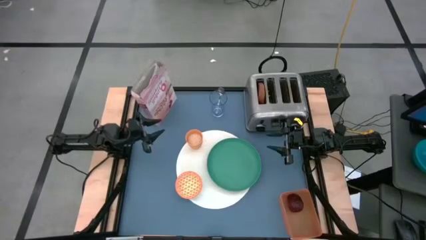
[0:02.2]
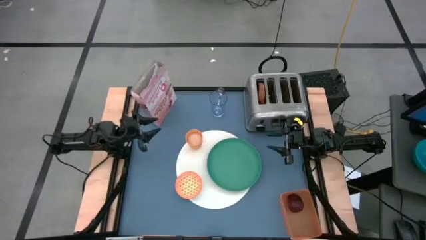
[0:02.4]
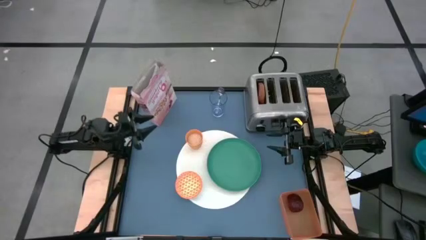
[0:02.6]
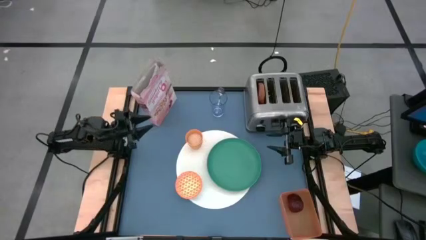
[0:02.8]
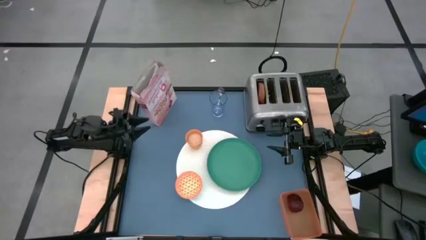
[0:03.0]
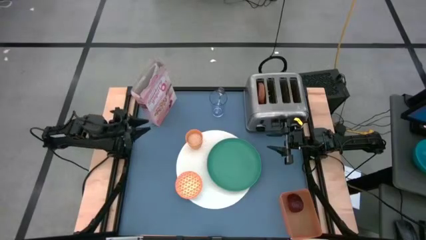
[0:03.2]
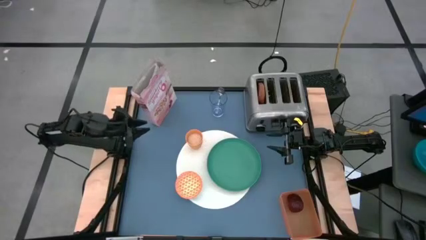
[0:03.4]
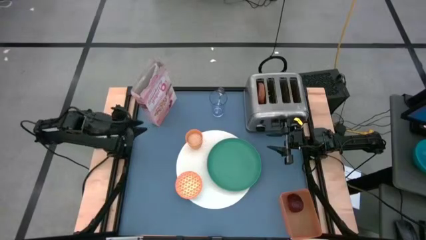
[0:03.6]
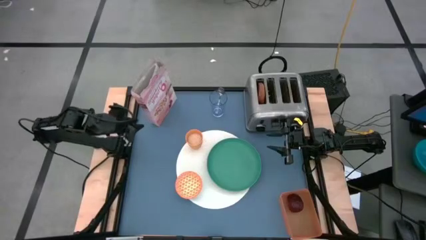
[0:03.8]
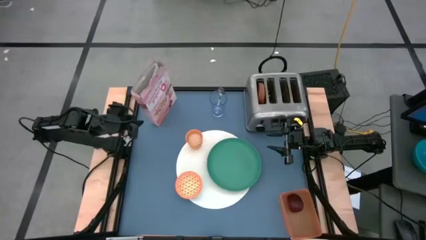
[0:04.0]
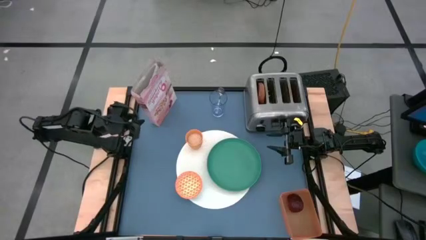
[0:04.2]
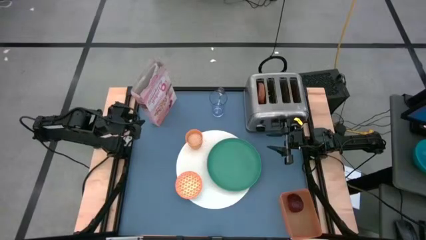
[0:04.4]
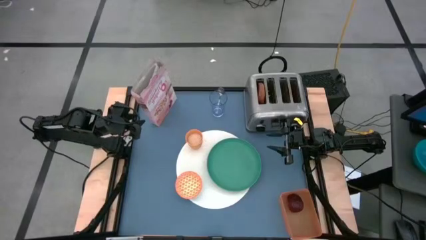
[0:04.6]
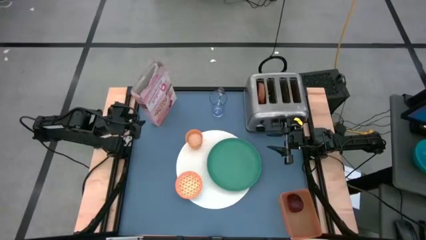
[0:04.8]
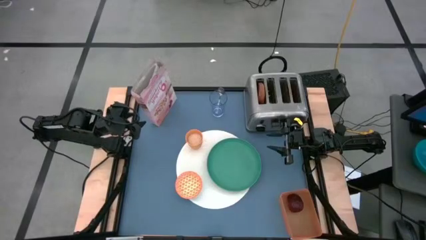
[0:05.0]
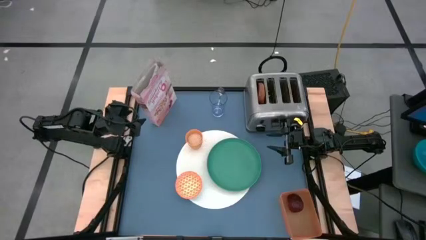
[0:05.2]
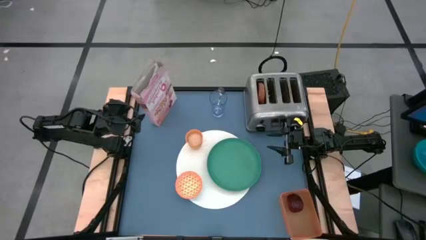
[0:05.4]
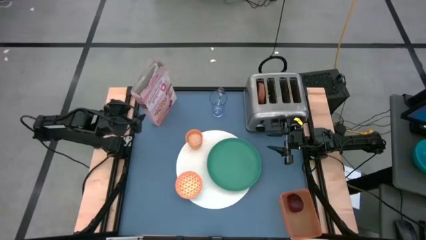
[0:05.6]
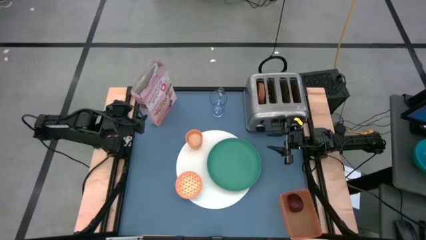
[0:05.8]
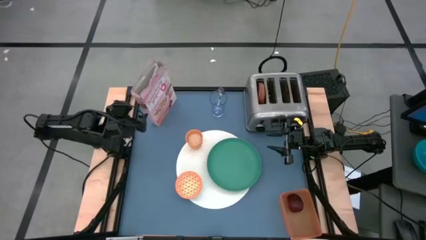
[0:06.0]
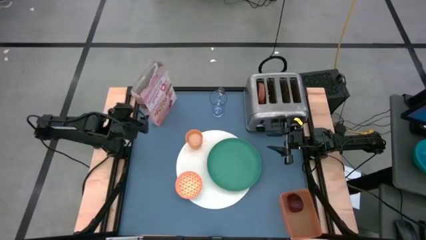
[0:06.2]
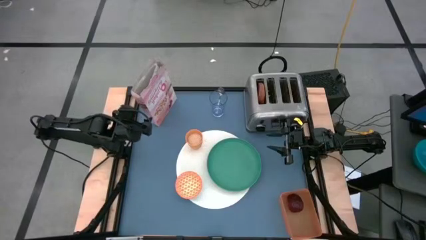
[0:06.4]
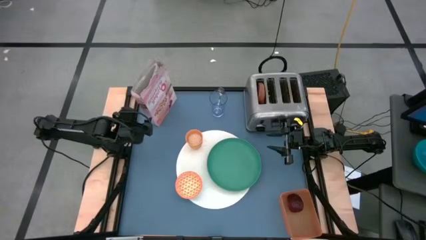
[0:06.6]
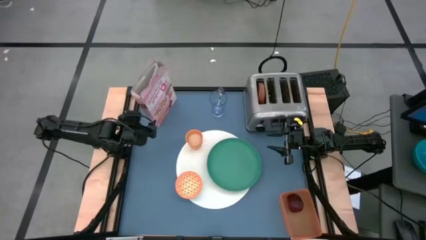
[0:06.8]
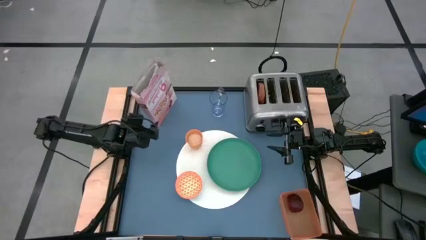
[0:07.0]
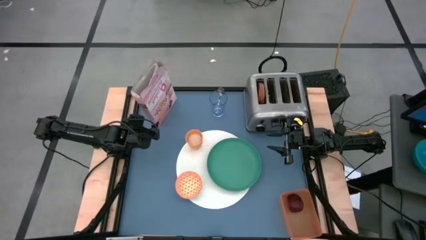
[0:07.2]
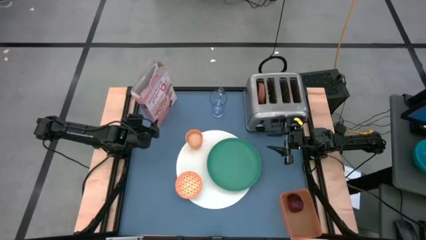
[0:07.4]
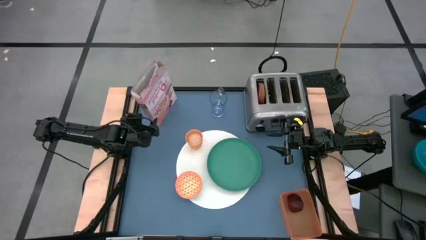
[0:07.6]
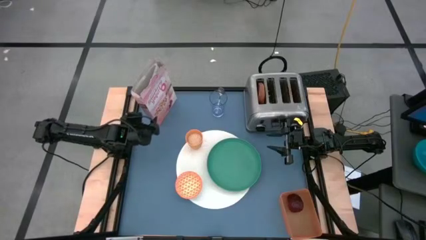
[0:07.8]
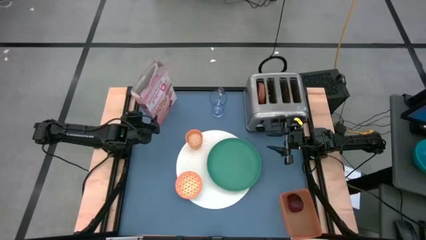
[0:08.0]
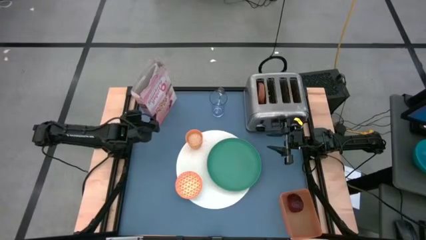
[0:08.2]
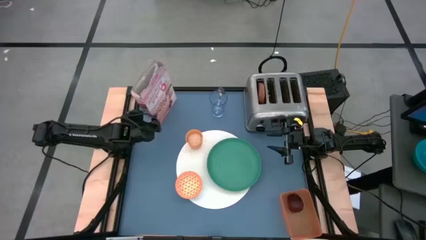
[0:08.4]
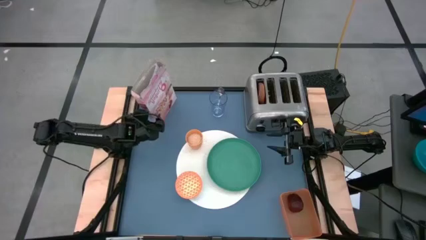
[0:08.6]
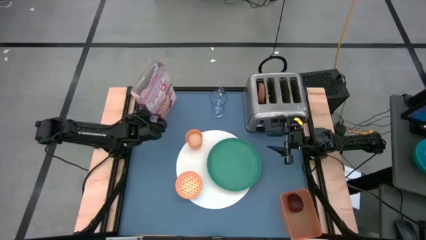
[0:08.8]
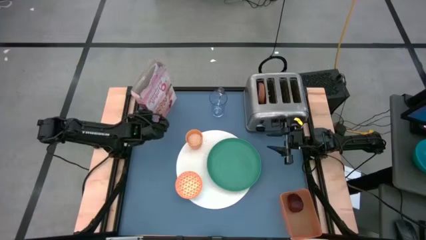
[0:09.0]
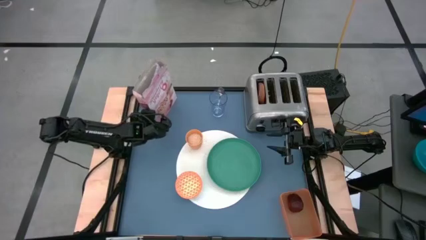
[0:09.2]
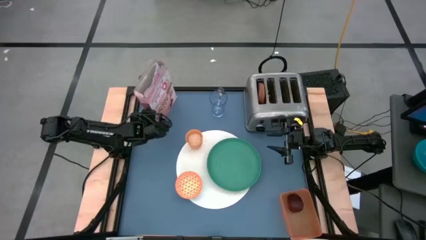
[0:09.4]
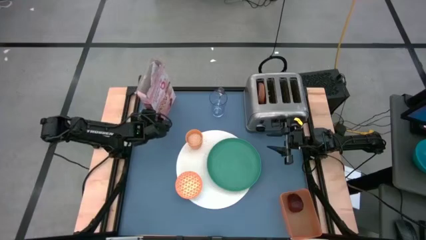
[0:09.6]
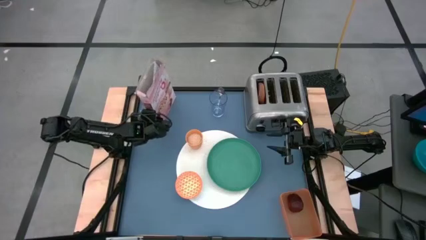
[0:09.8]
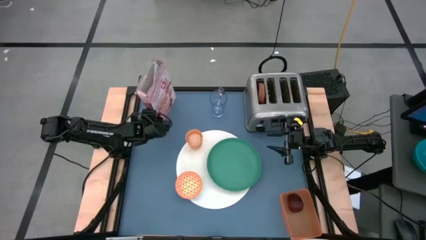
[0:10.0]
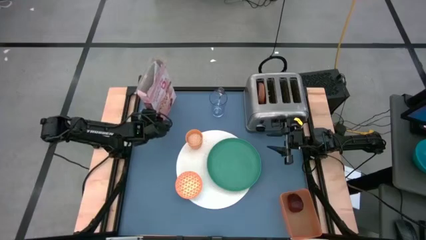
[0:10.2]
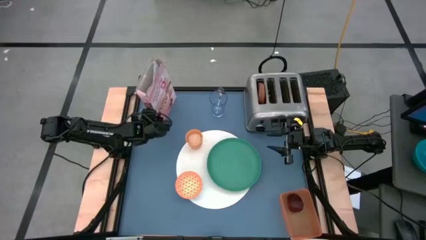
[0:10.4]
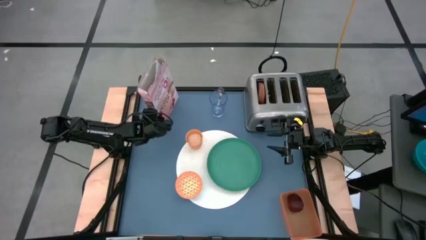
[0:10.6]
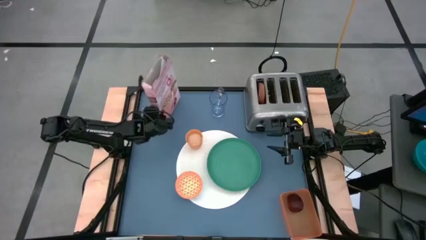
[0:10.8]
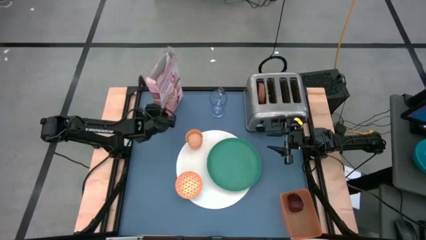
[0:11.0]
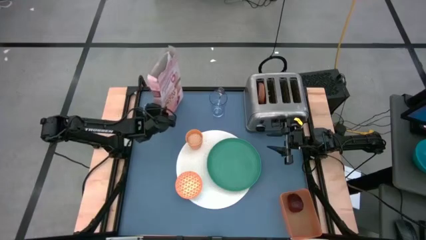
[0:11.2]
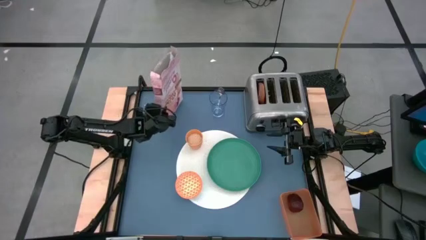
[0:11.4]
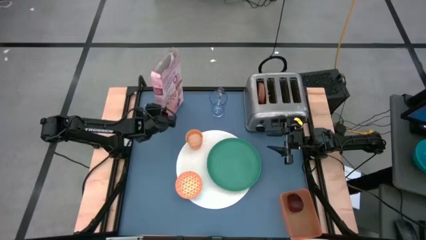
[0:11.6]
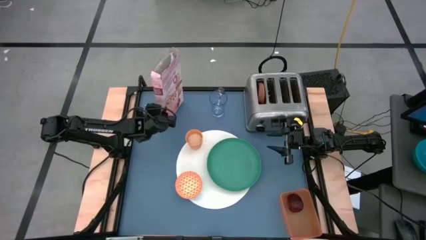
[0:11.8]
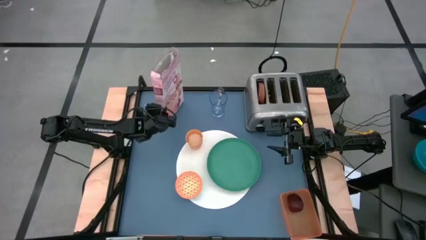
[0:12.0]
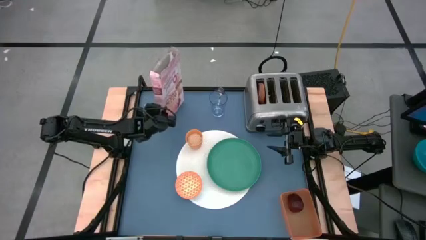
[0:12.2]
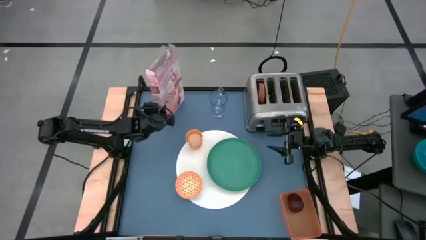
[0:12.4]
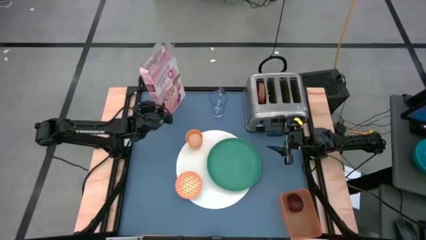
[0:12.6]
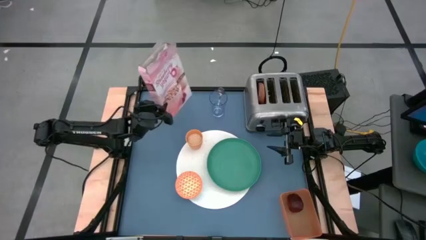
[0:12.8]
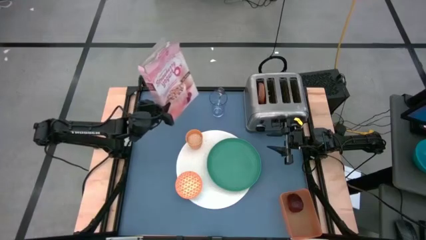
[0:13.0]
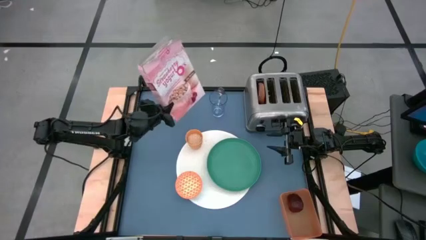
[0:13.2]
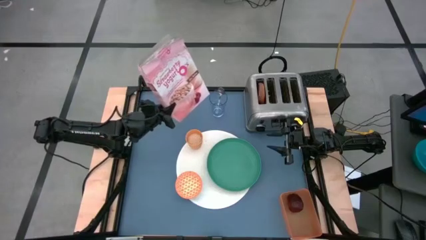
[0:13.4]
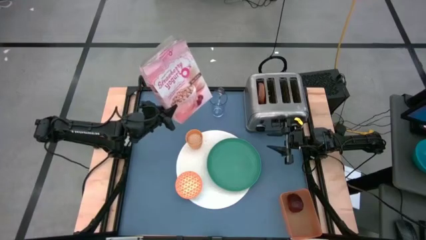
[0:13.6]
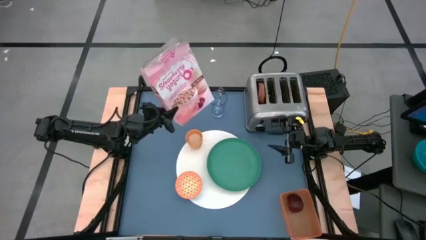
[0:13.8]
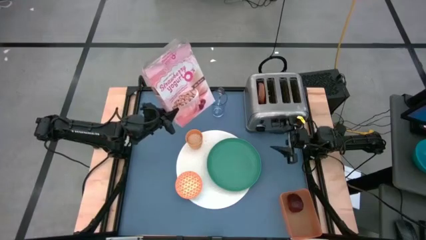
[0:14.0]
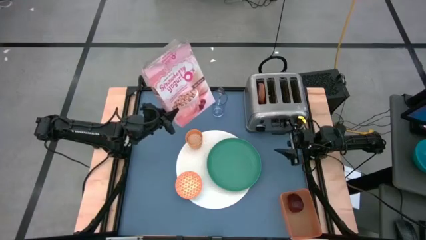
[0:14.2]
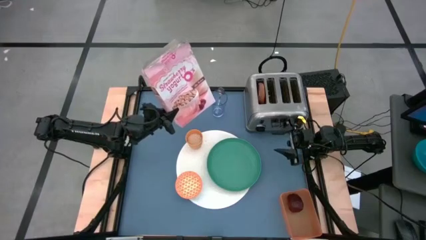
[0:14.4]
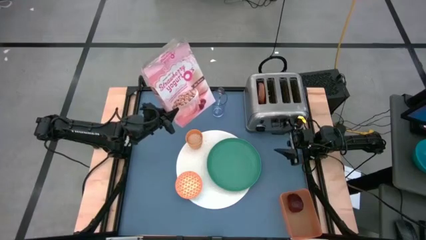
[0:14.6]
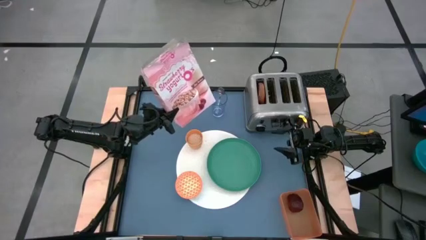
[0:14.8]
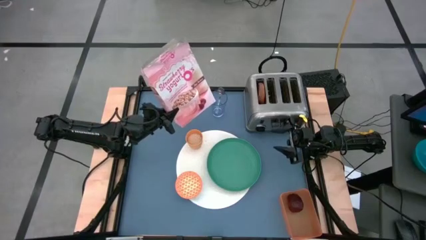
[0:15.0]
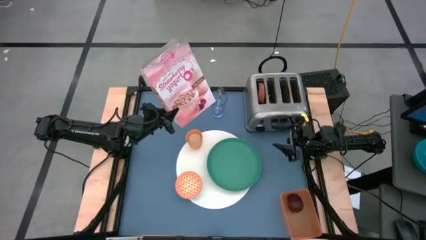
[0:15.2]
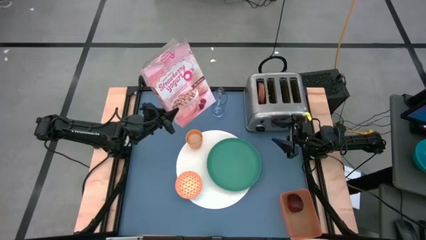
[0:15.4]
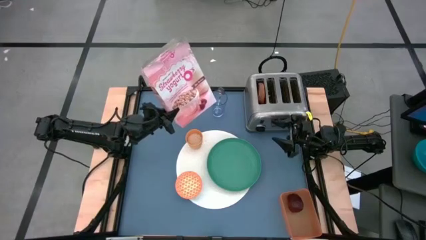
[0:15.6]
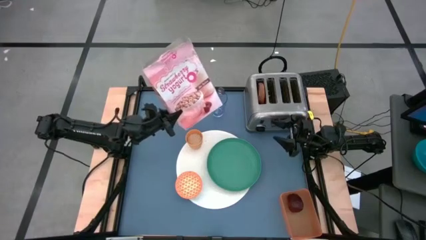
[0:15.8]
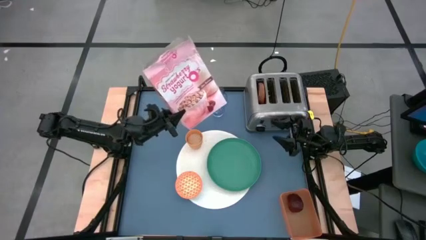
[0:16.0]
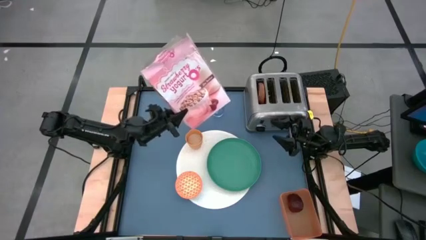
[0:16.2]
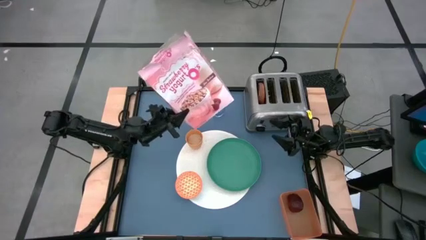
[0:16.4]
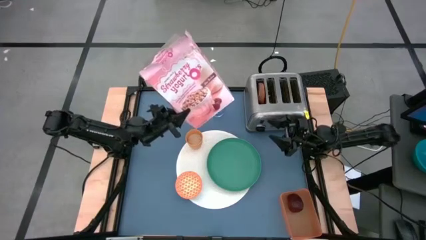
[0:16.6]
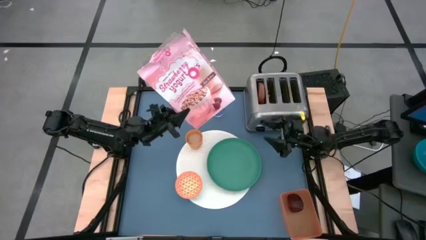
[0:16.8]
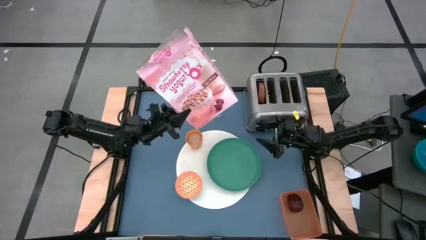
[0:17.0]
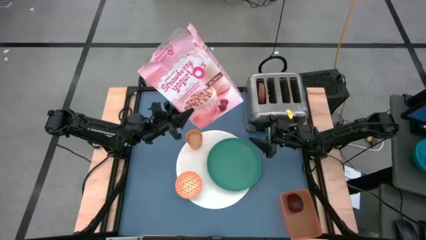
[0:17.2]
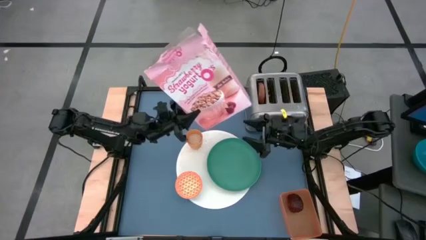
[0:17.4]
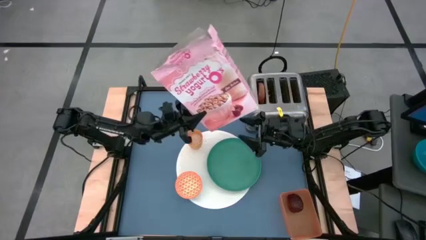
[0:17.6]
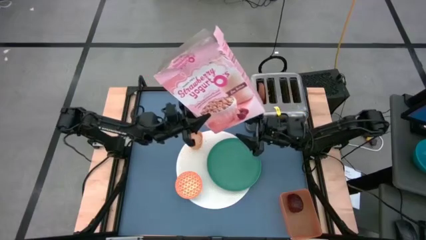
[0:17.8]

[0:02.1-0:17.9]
Task: Arrange a breakfast setting
Pour the cereal from the orange cereal box into the orange bowl
